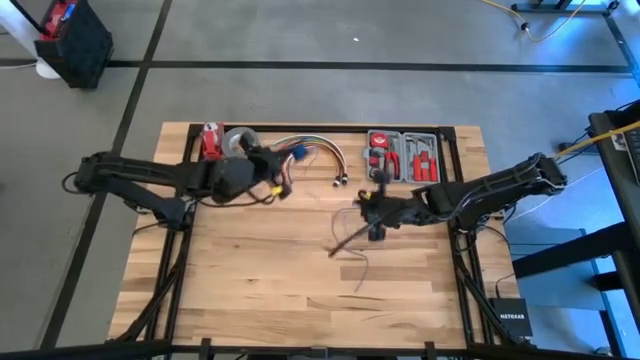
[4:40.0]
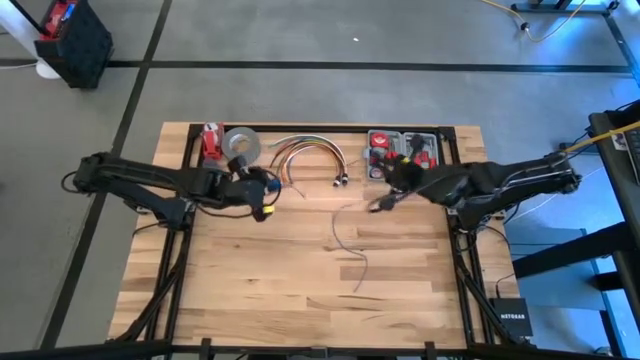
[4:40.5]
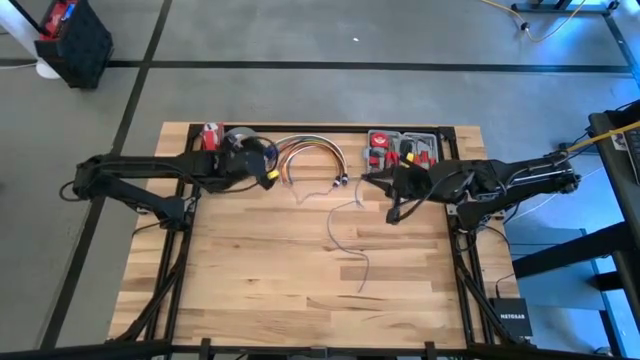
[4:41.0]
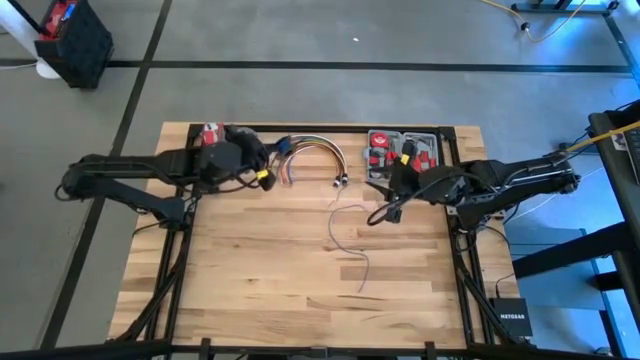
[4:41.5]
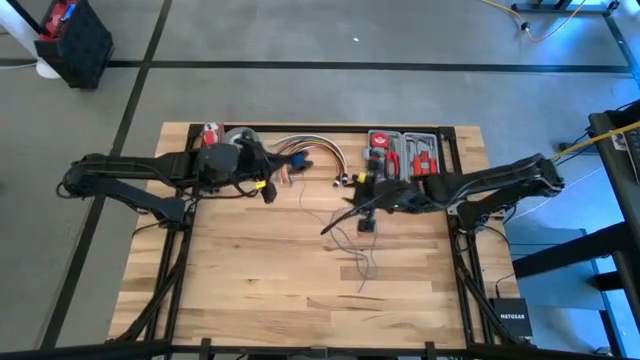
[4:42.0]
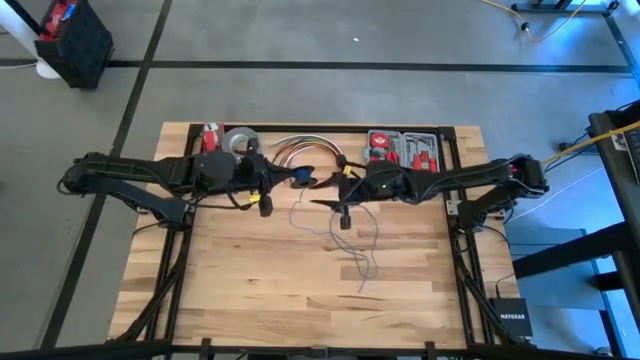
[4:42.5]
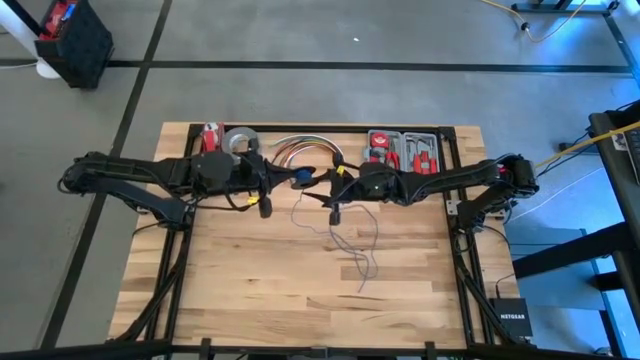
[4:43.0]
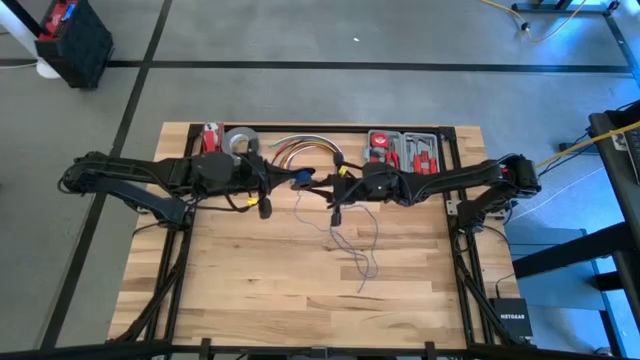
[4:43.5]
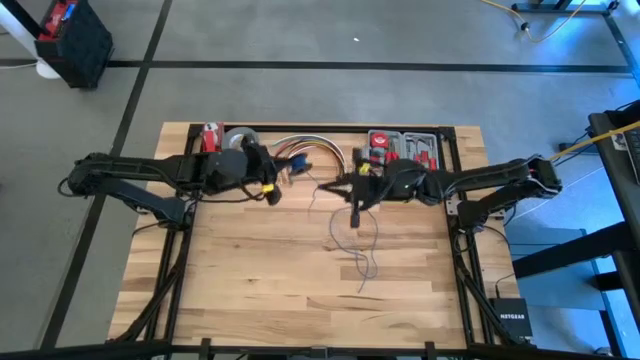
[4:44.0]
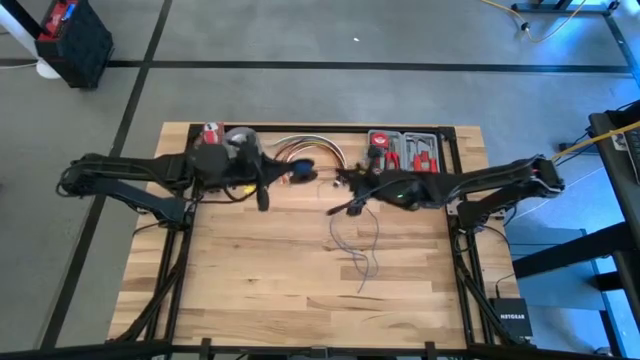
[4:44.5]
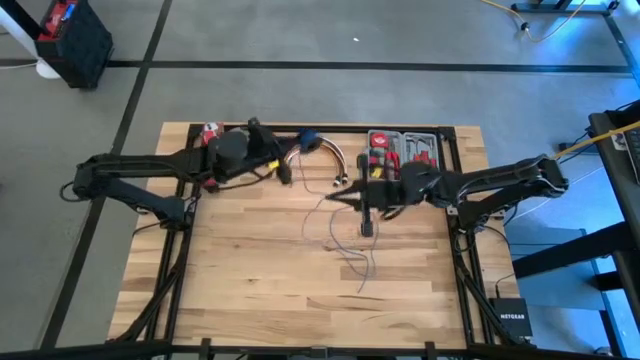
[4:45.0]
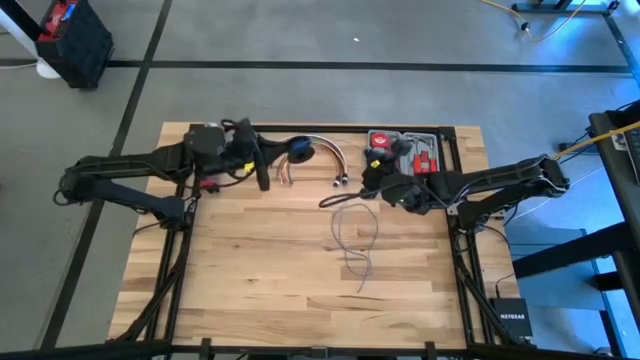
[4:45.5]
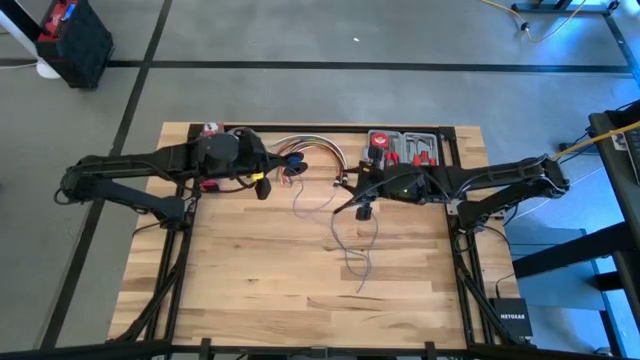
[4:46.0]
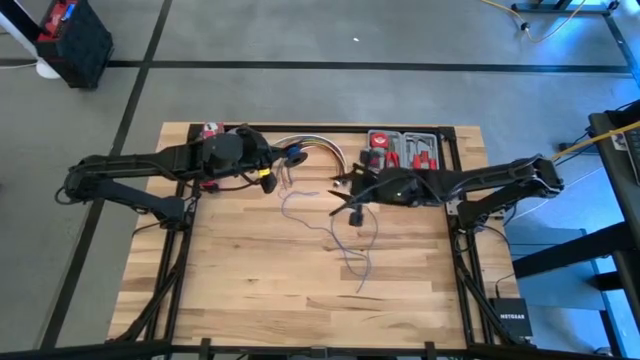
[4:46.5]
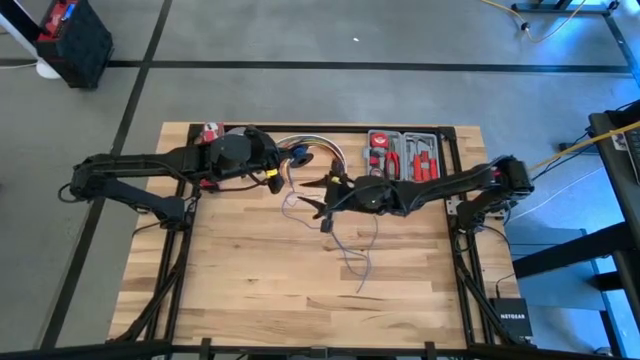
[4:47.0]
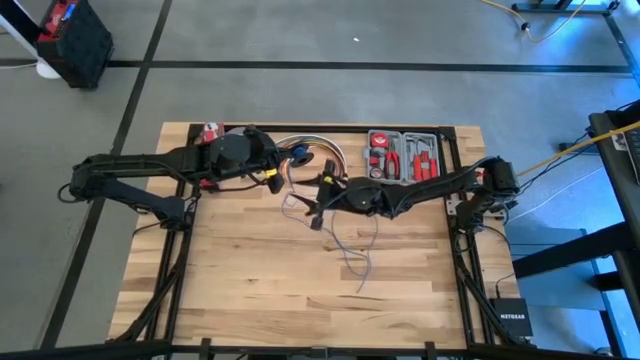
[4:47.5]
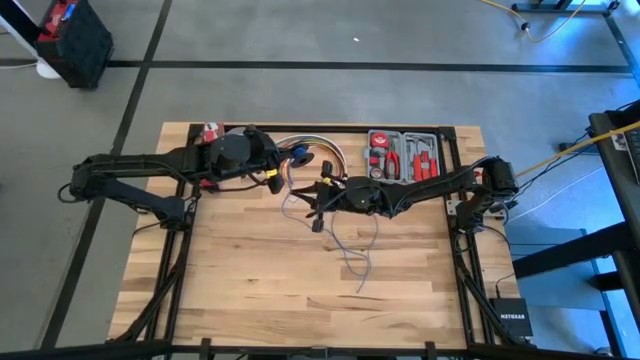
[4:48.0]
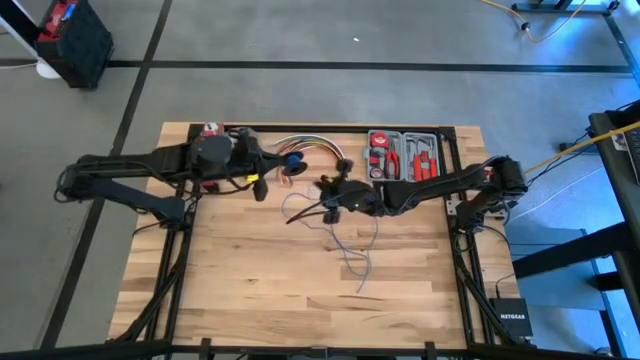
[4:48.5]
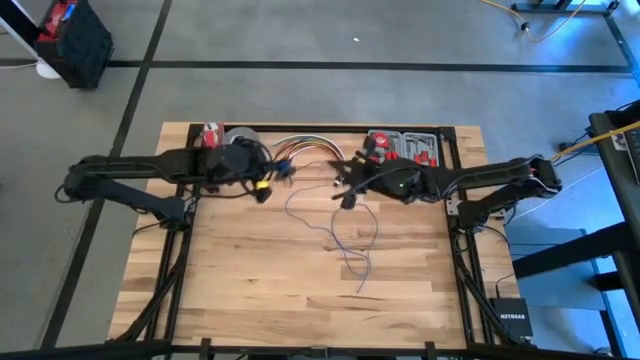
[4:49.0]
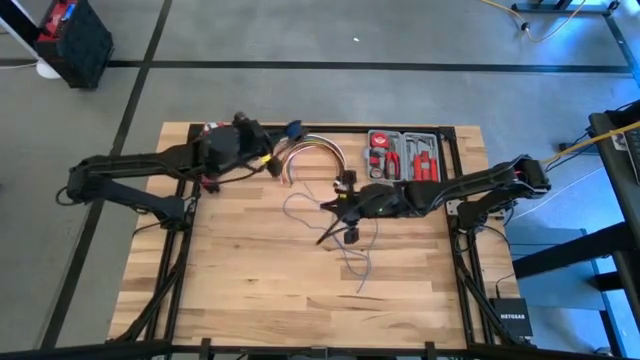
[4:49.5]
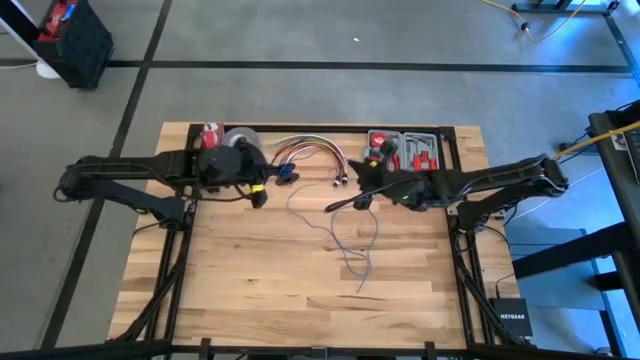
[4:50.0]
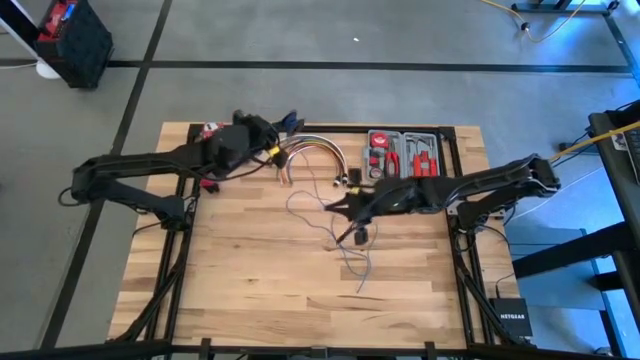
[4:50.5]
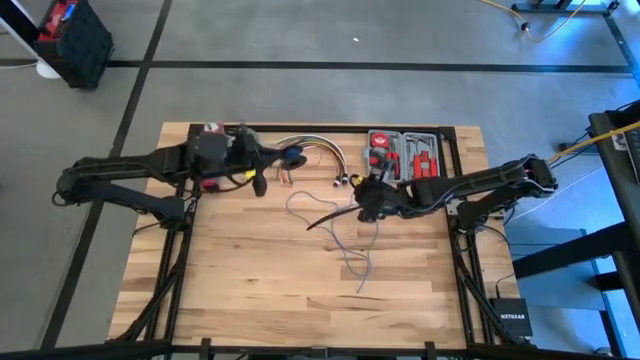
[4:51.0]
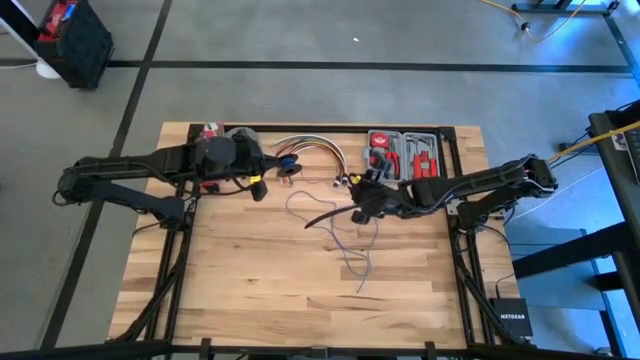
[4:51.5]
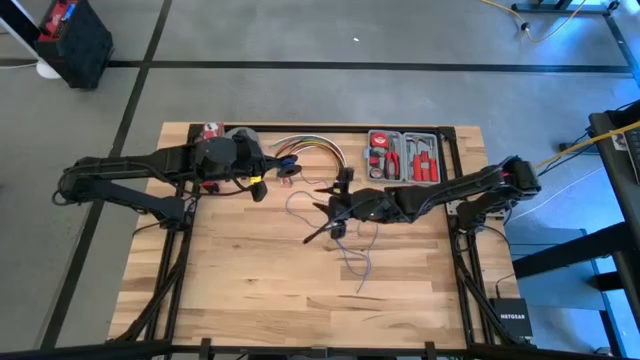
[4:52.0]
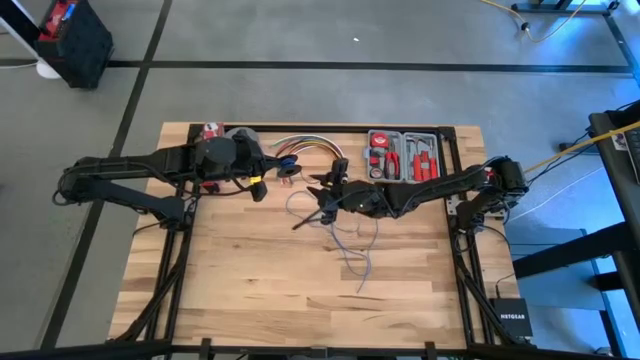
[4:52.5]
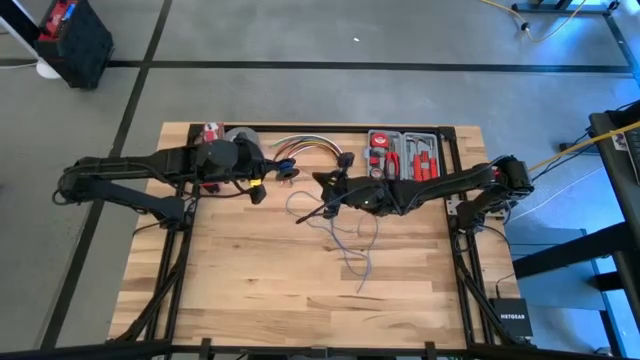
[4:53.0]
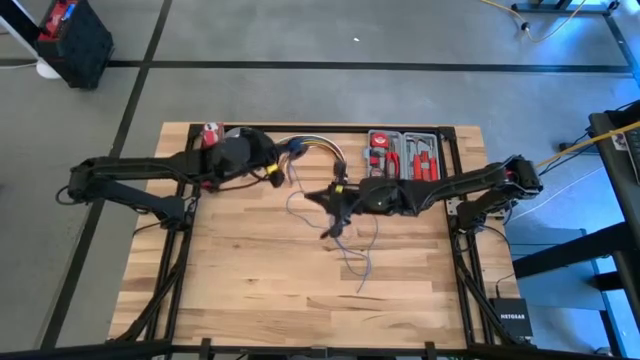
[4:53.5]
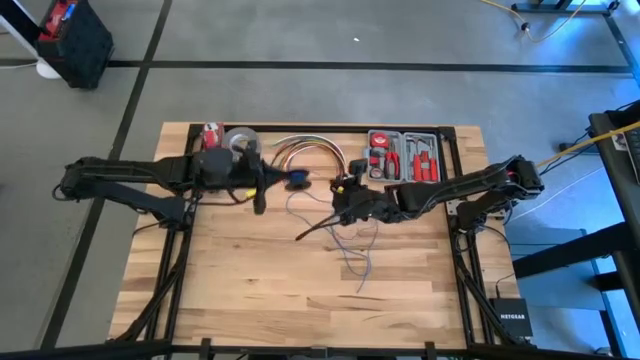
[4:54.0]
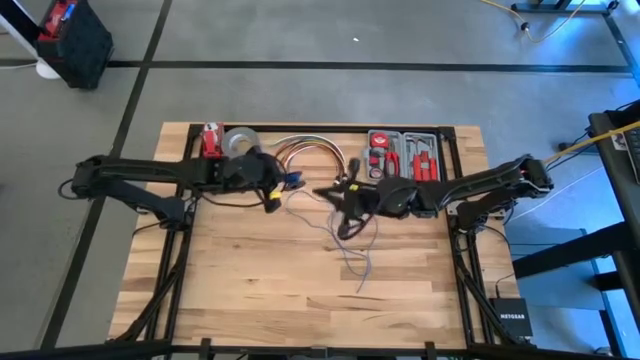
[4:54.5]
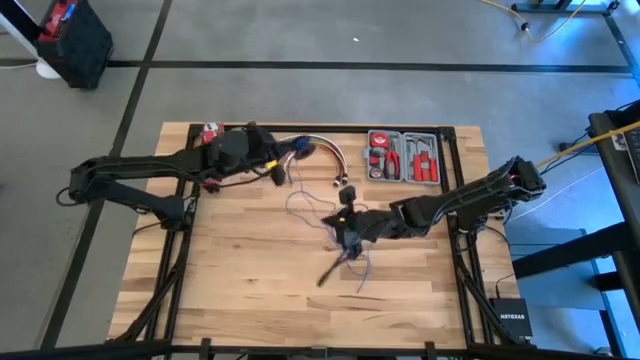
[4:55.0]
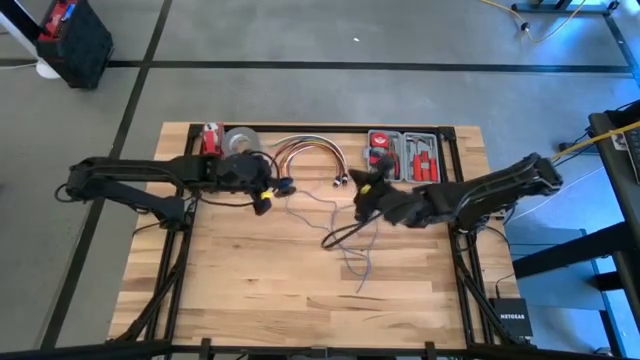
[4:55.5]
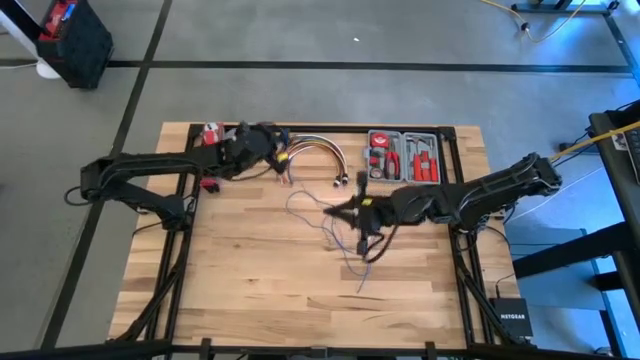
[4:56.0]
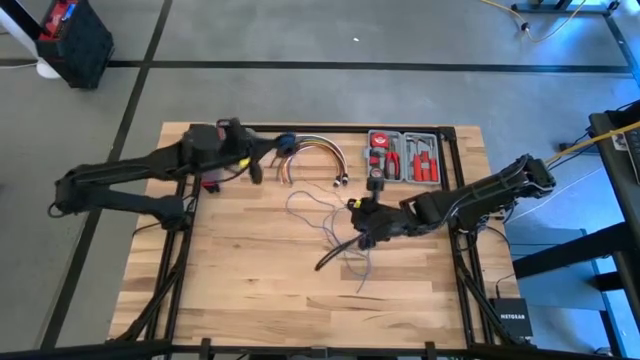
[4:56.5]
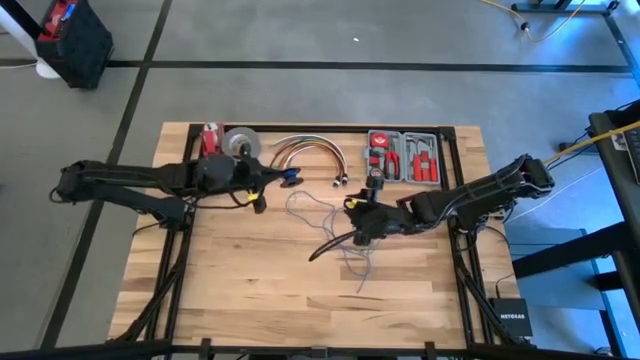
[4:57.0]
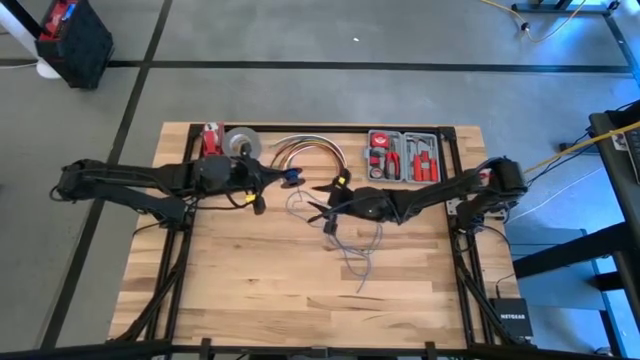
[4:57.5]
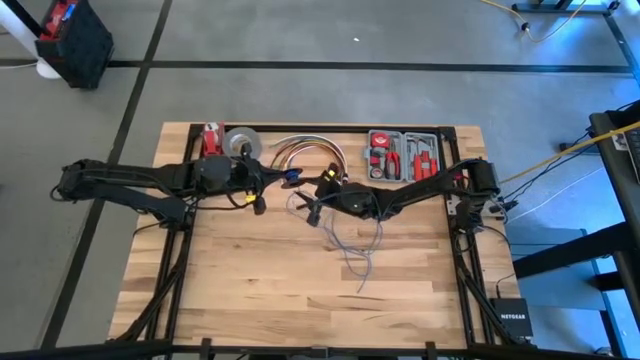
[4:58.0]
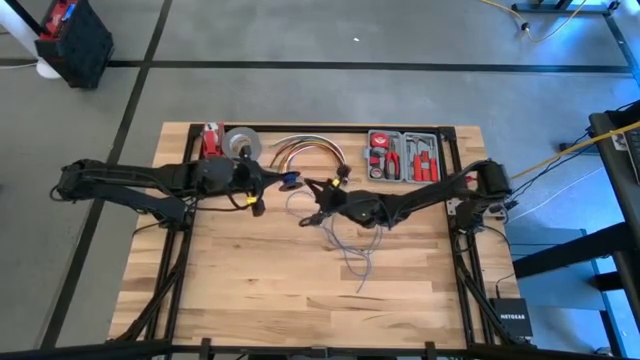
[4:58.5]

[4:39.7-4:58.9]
Task: Coil cords
Uncoil the blue wire from the black spool

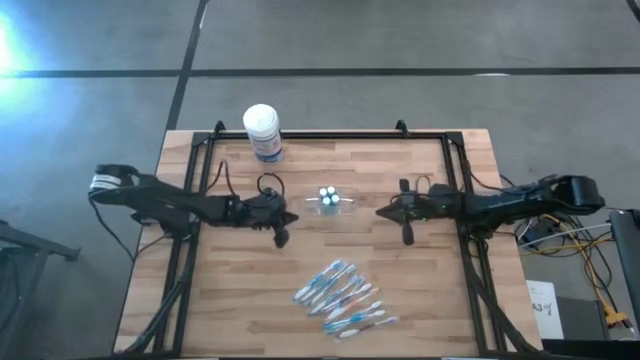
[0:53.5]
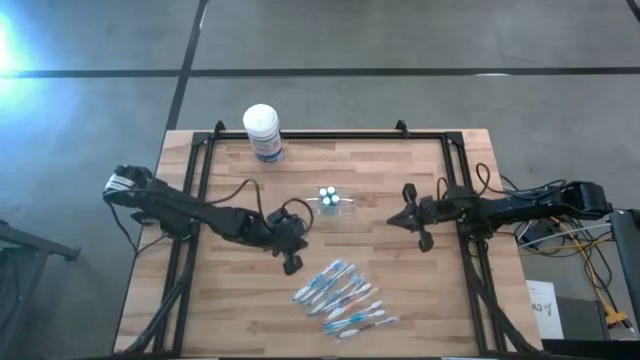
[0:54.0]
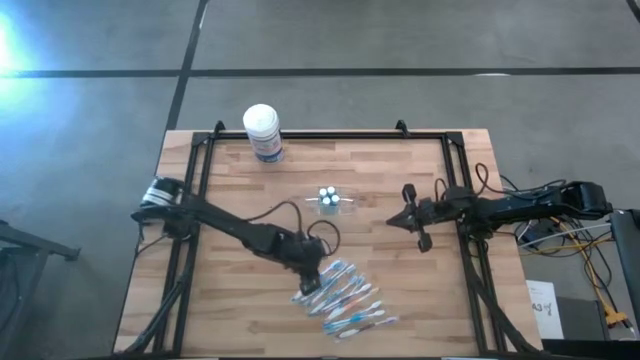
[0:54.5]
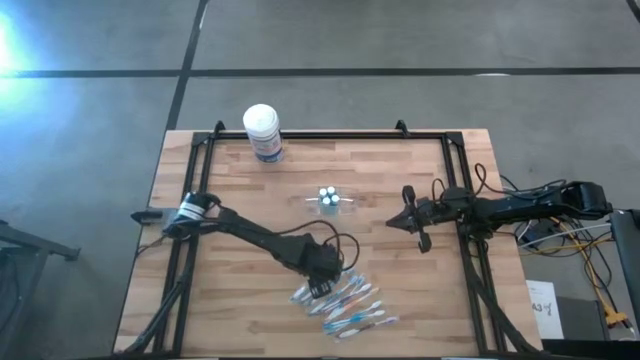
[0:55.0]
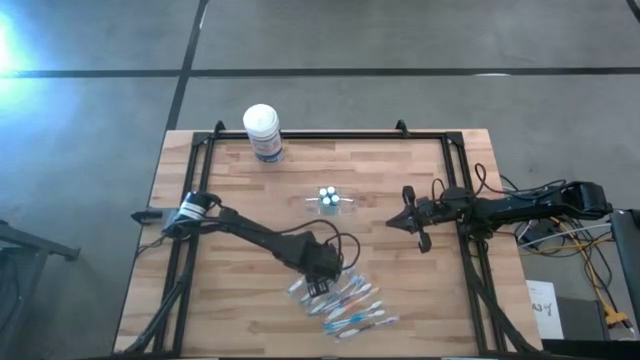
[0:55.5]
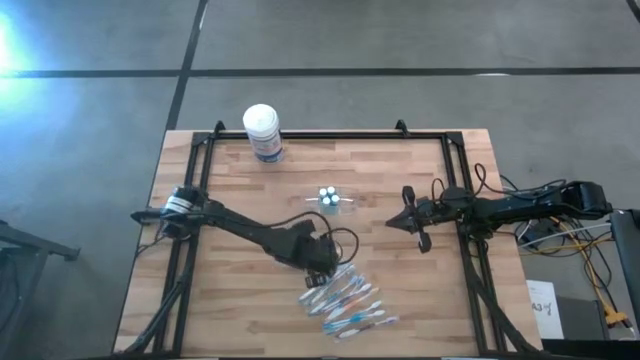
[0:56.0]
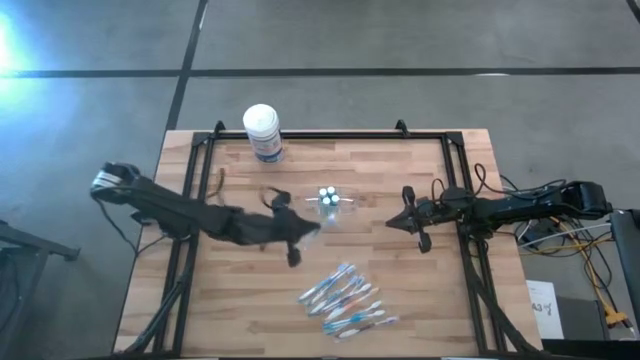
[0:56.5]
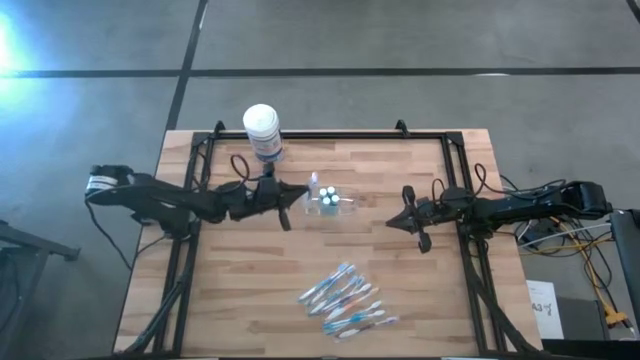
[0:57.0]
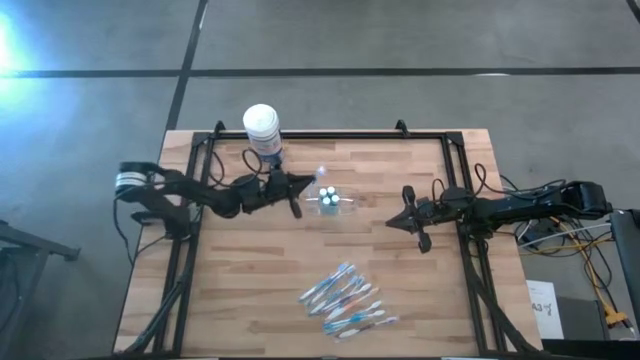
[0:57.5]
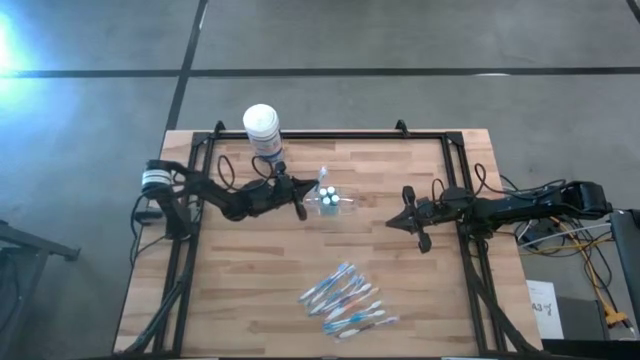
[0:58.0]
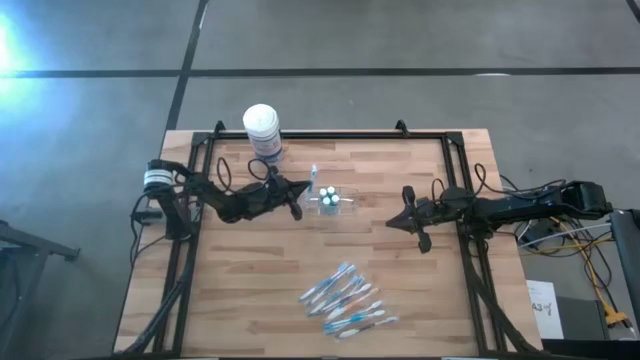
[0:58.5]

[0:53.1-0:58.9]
Task: Pick & Place toothbrushing station
Put the blue toothbrush into the transparent organizer
